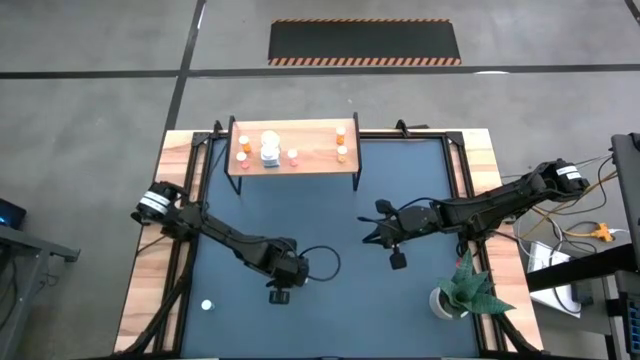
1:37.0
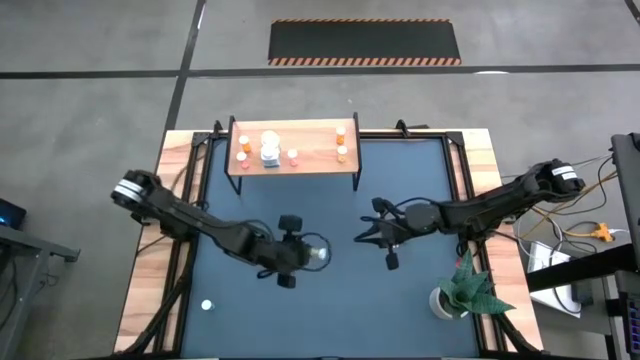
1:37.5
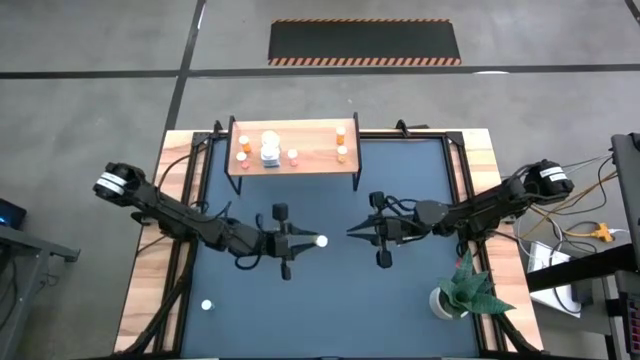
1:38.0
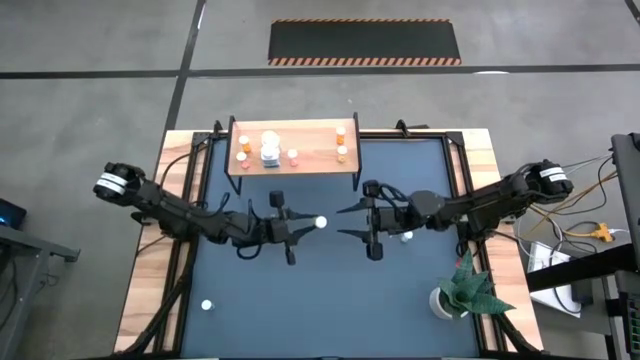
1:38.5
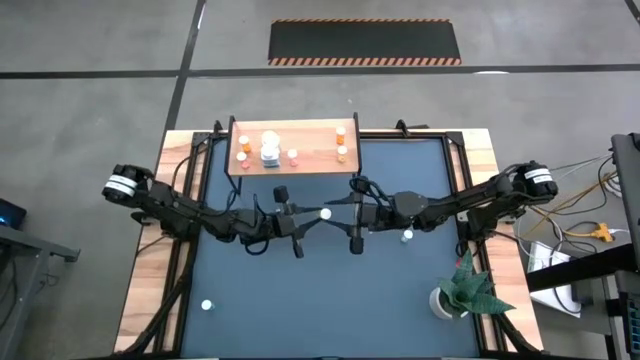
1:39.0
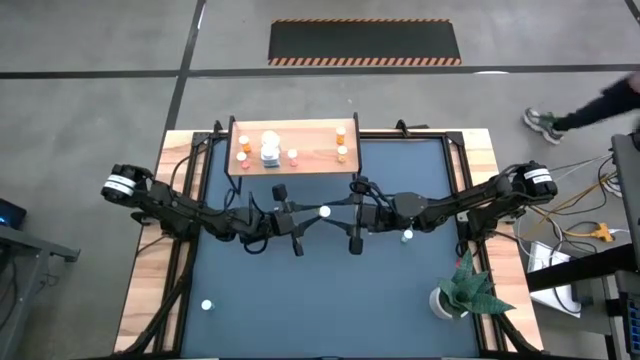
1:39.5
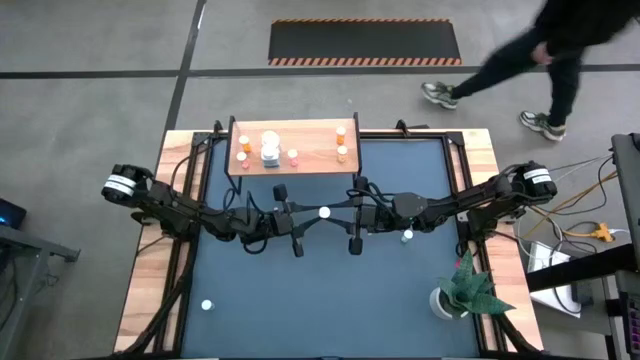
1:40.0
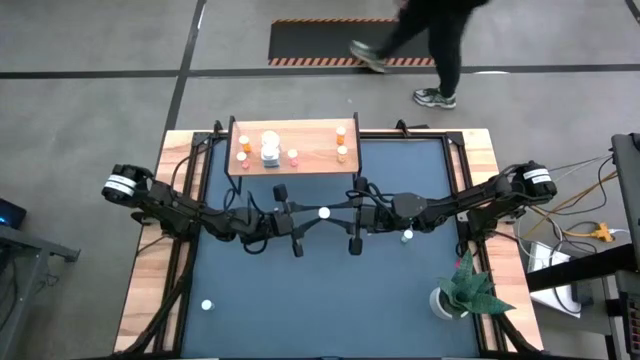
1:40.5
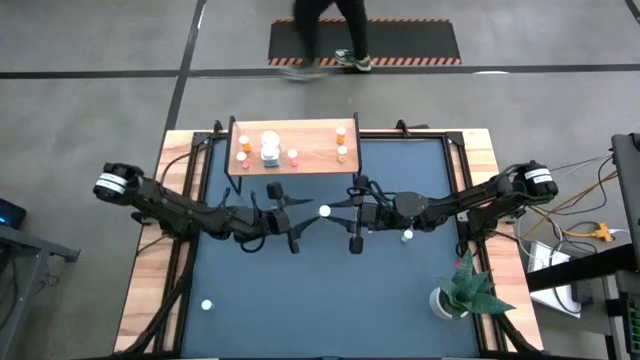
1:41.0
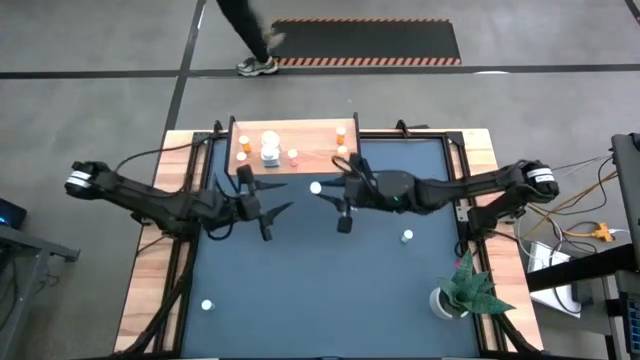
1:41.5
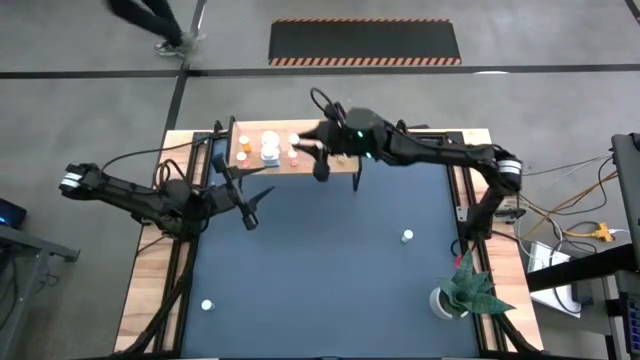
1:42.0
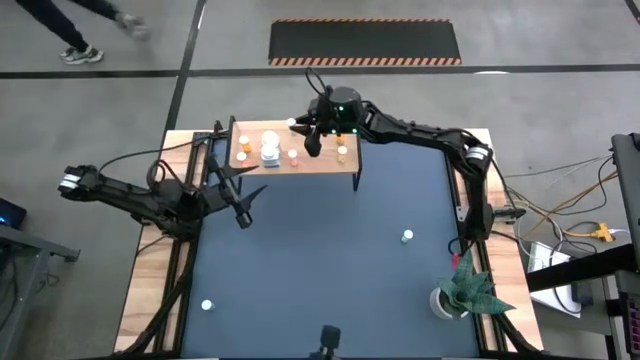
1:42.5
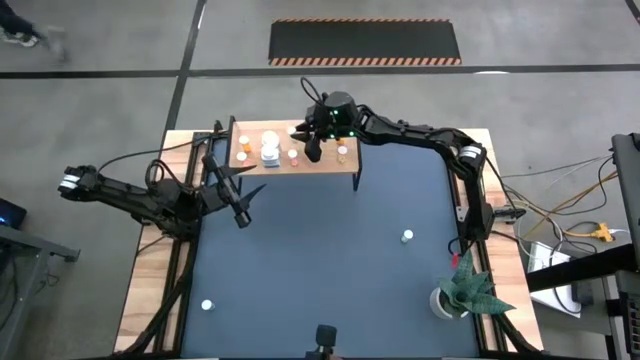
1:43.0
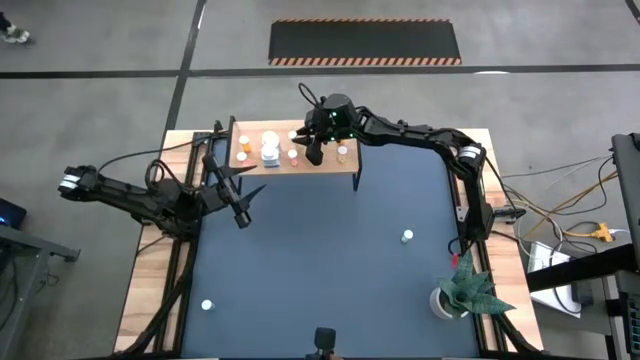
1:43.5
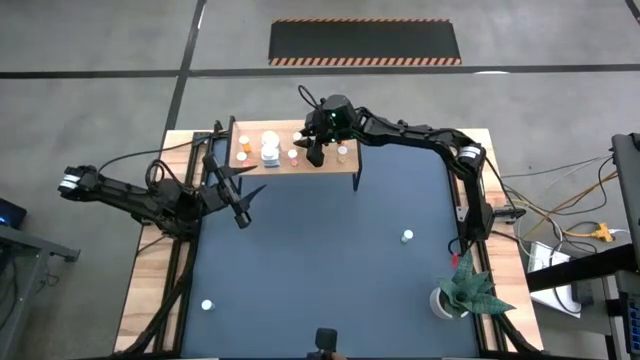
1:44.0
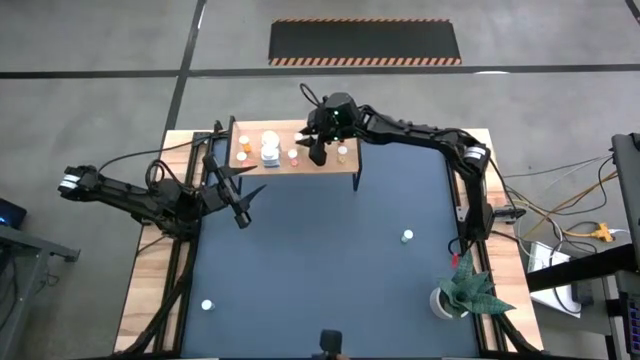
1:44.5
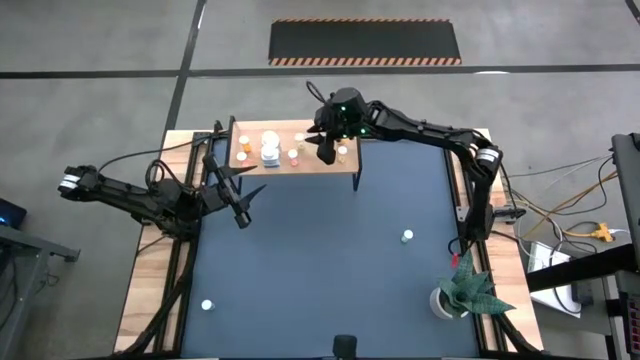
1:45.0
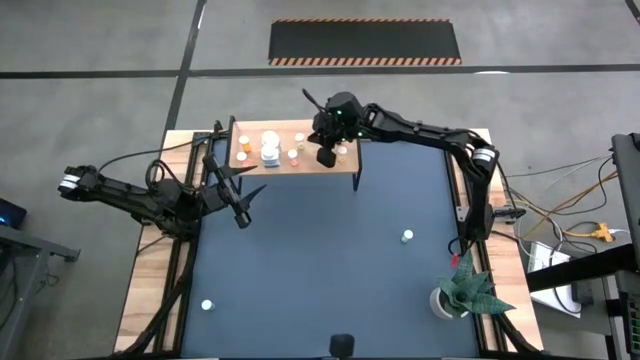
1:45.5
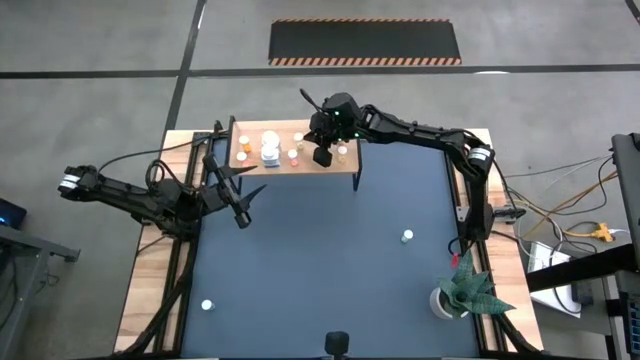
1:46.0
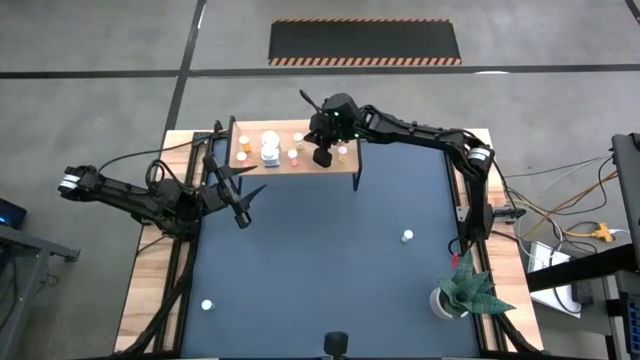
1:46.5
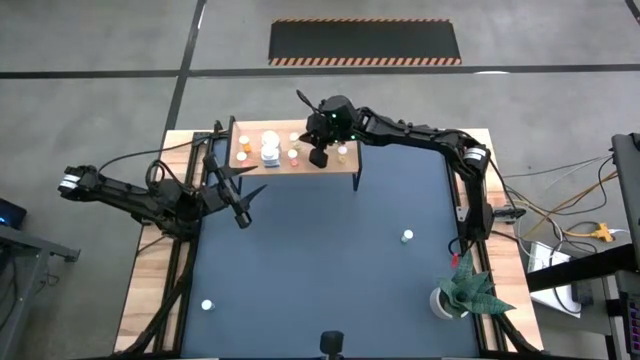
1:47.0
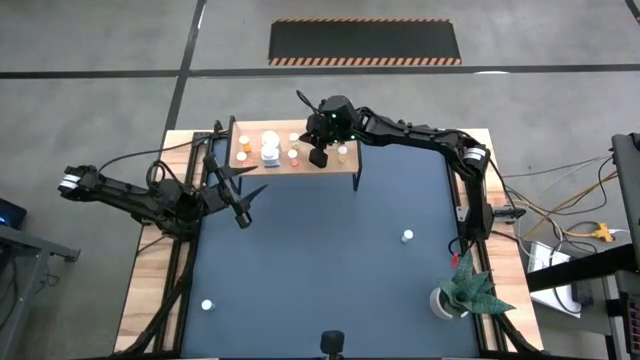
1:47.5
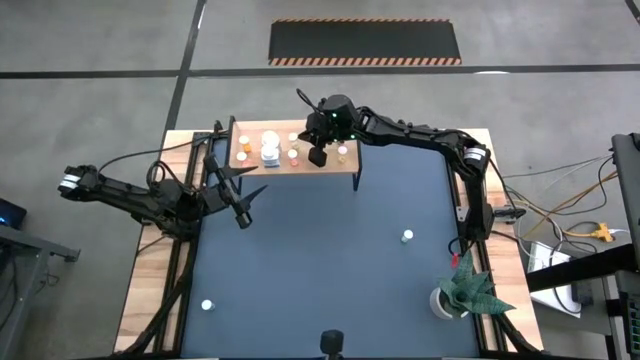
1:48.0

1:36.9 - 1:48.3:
Task: Pick and place medicine bottles onto shelf by color
Put the green pill bottle on the shelf

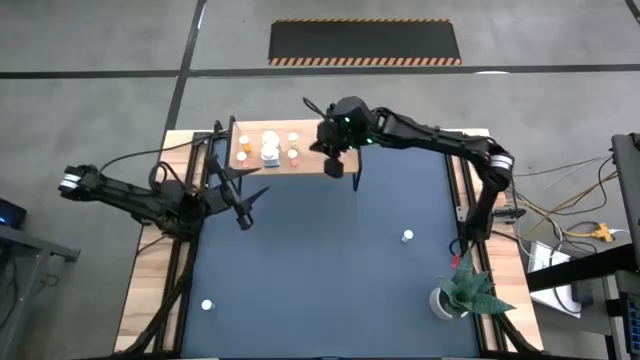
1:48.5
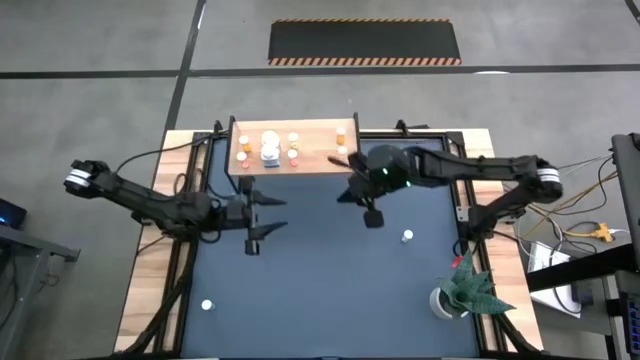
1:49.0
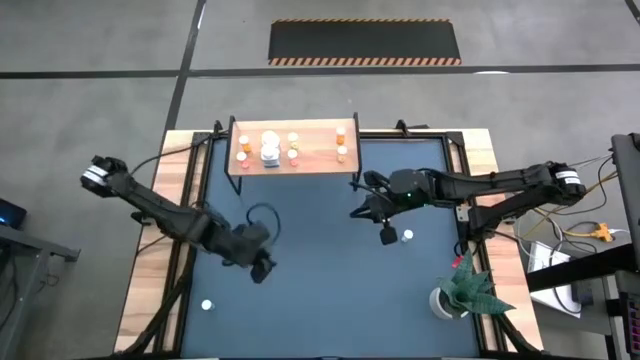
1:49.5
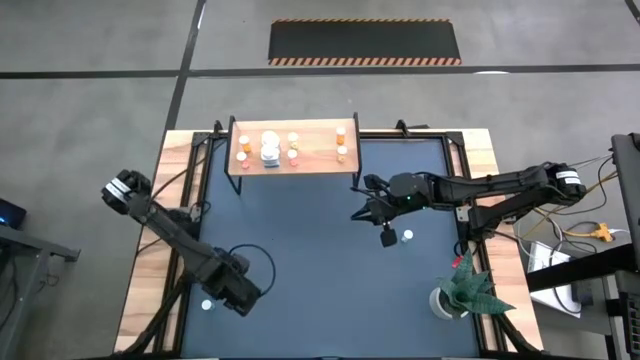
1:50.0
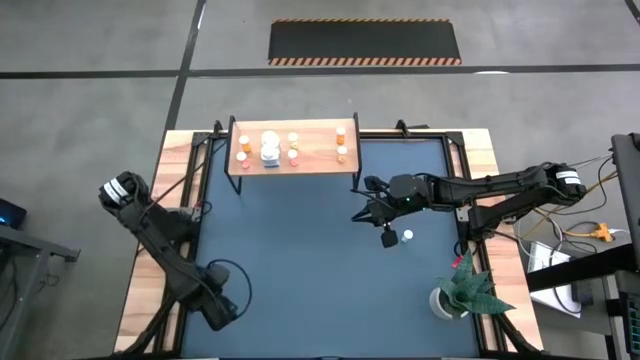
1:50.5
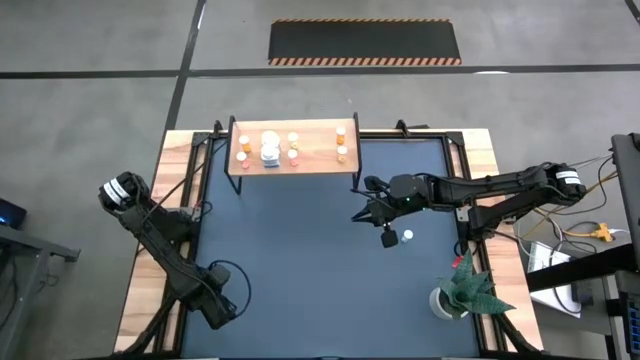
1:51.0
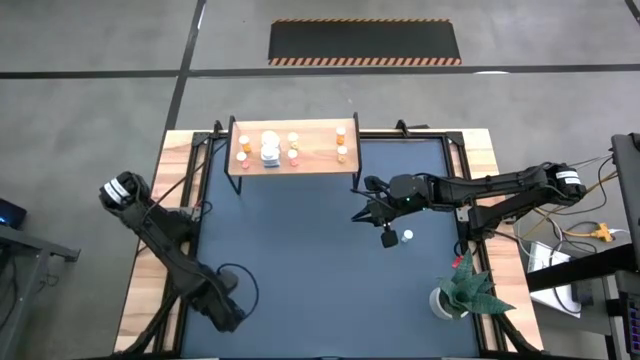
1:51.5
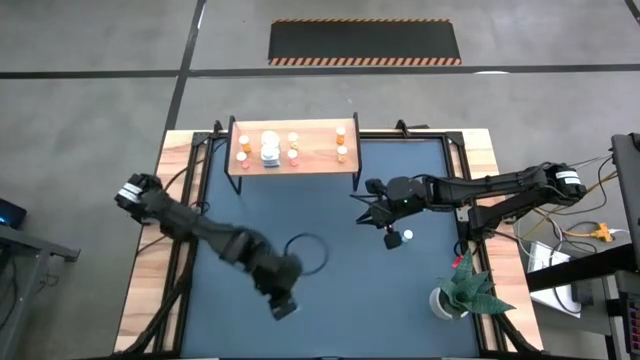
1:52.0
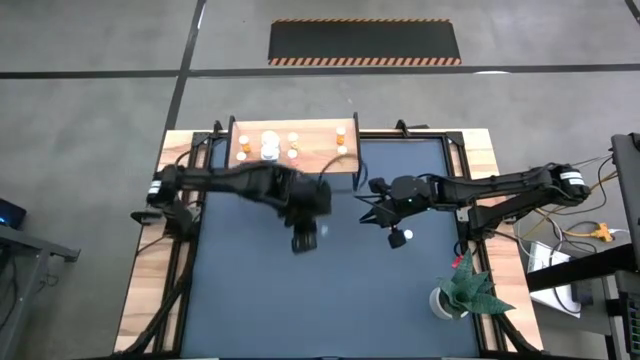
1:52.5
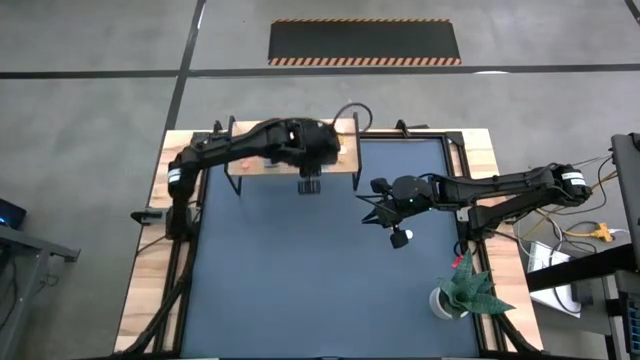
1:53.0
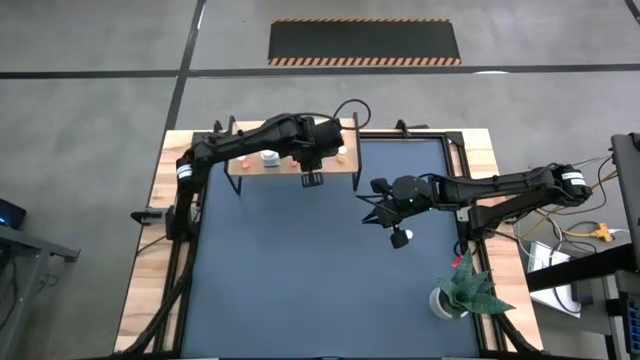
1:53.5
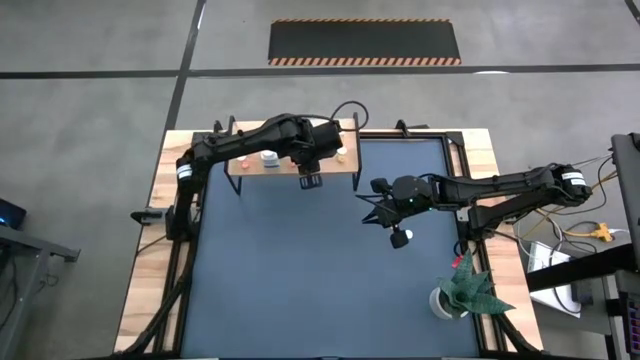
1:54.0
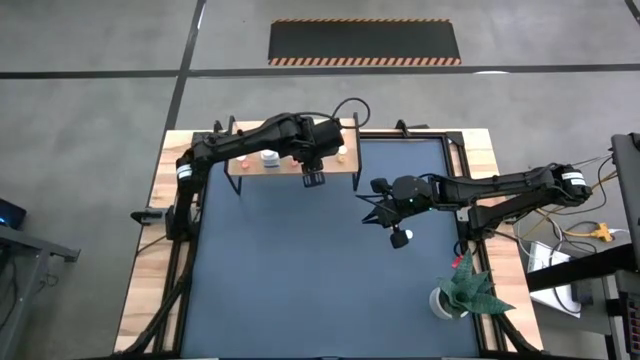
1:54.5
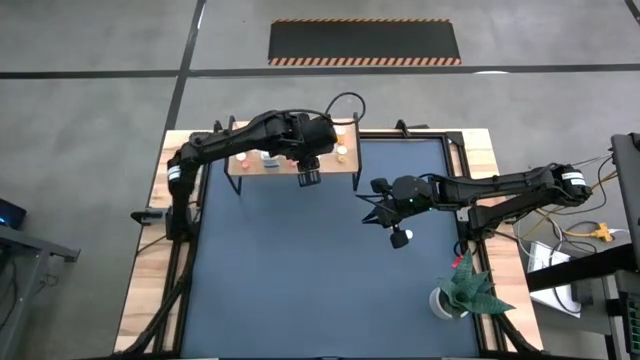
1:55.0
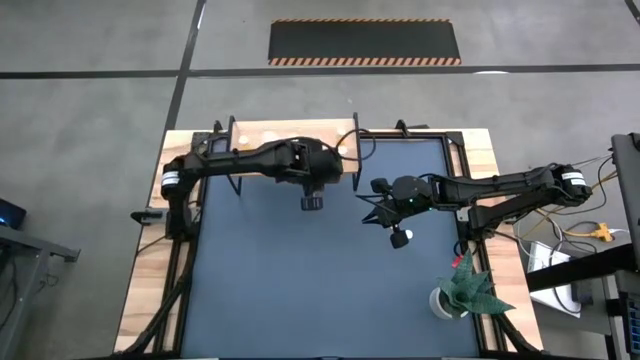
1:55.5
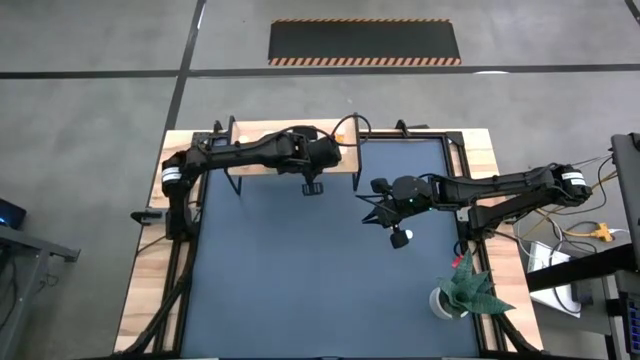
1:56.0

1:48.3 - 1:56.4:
Put the left blue pill bottle on the shelf
